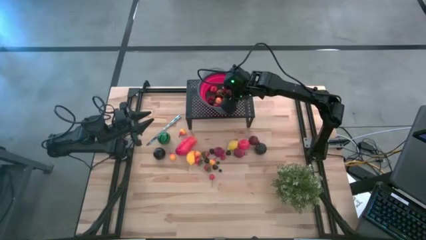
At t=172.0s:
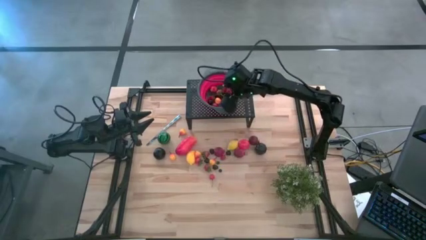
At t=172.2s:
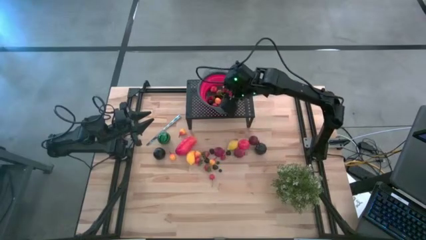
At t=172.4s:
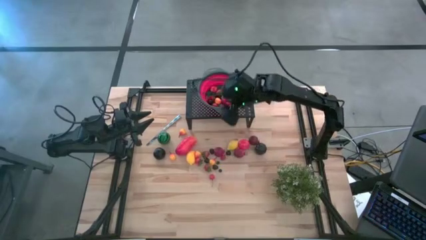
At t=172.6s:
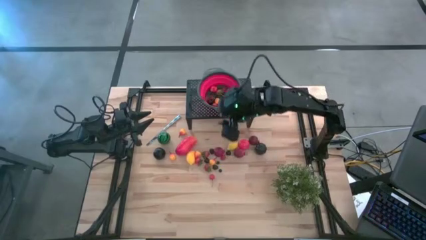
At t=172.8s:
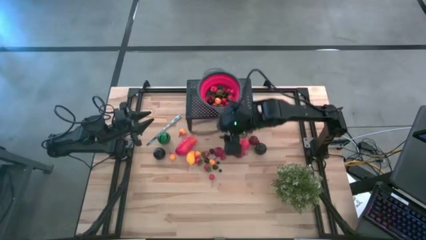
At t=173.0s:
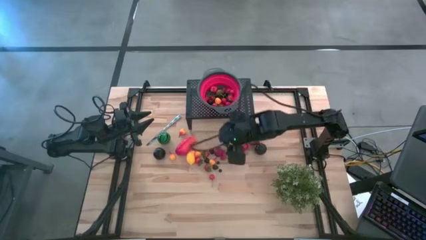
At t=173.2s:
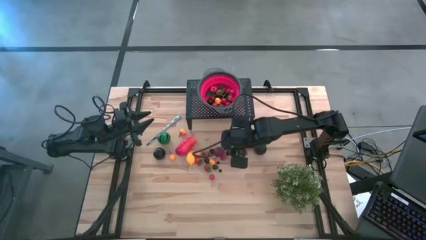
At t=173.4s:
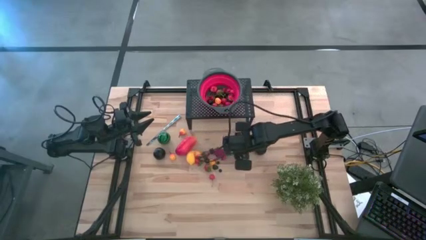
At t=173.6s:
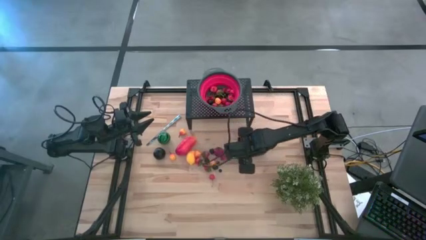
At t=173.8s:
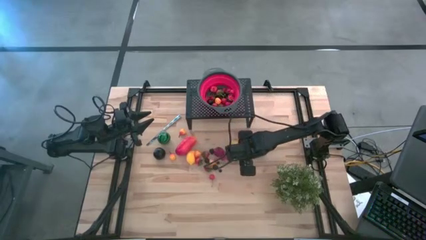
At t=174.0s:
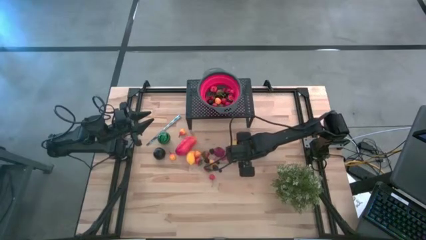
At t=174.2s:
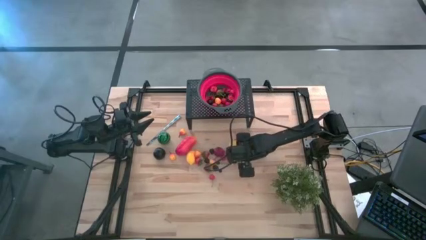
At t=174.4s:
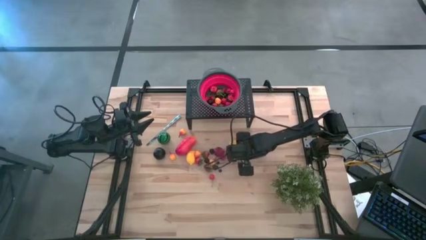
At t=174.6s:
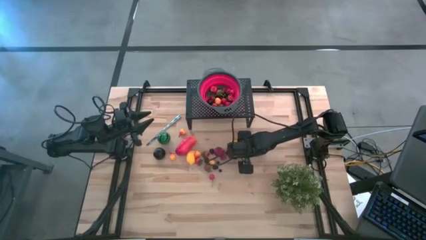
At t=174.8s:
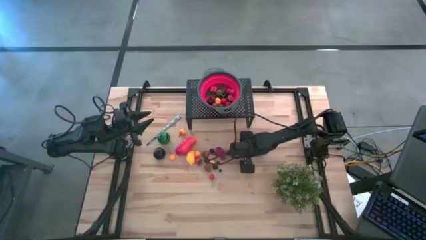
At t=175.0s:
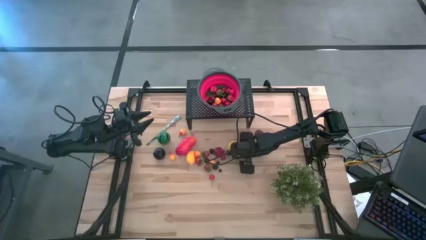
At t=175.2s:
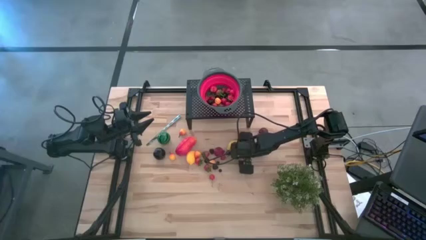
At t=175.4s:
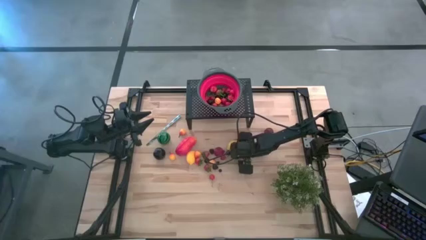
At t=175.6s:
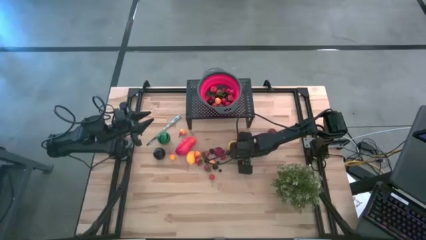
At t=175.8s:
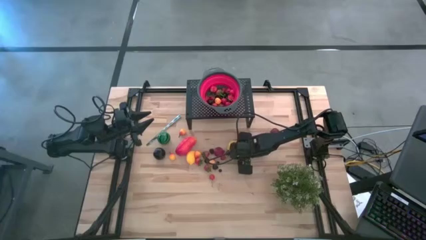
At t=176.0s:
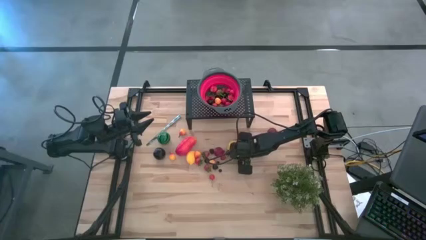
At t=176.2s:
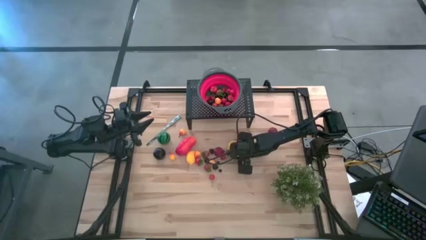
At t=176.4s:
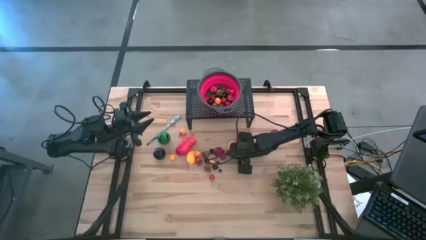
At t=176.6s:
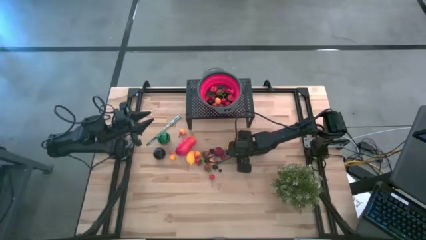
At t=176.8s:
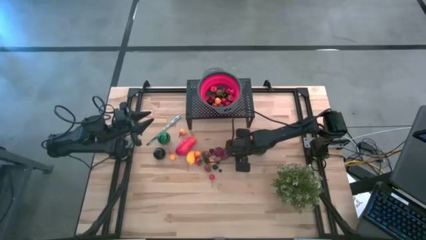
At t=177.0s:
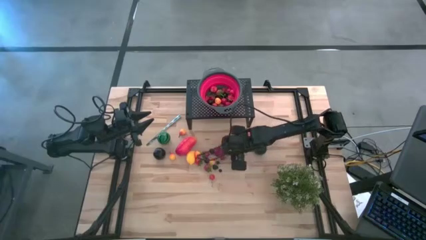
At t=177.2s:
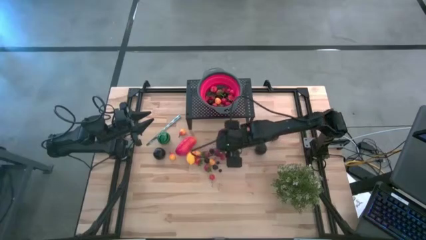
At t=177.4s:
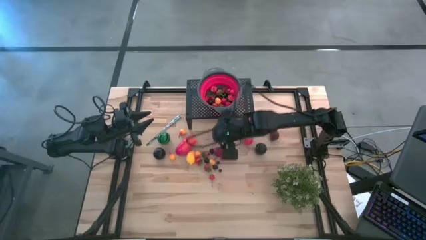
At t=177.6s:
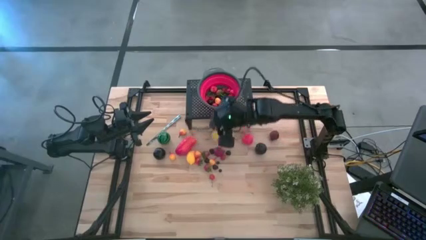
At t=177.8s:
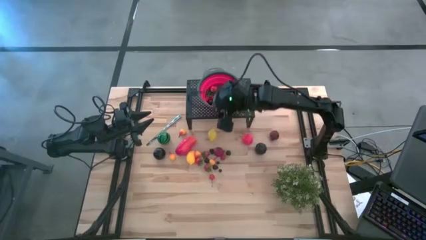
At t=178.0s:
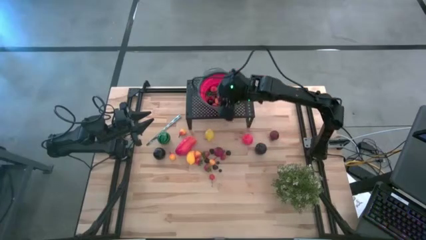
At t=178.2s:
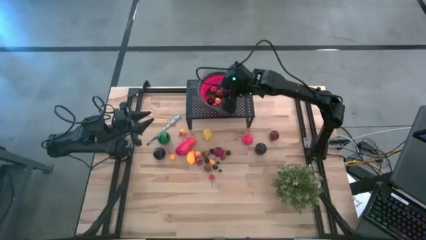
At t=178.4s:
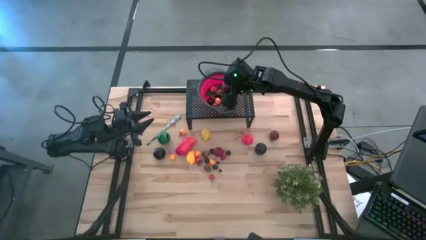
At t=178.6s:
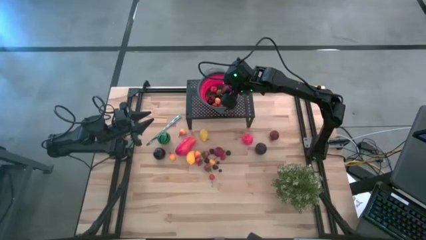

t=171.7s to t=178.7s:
Task: Pick & Place Fruit
Put the pomegranate in the red colander on the shelf

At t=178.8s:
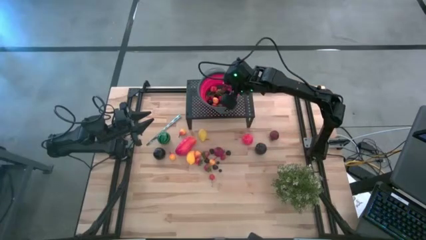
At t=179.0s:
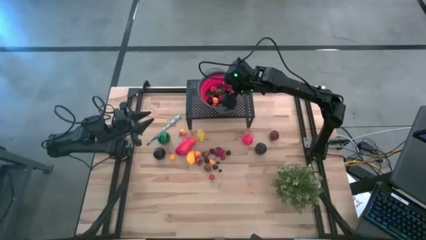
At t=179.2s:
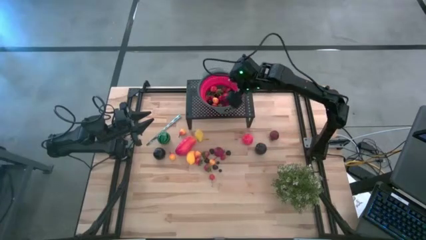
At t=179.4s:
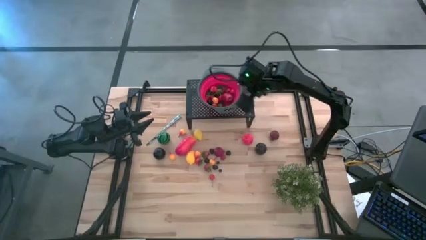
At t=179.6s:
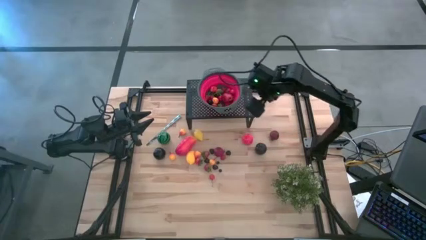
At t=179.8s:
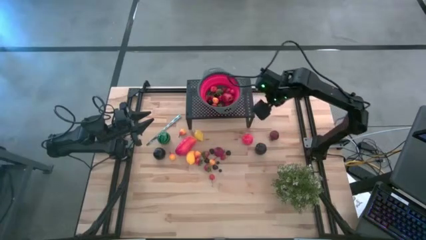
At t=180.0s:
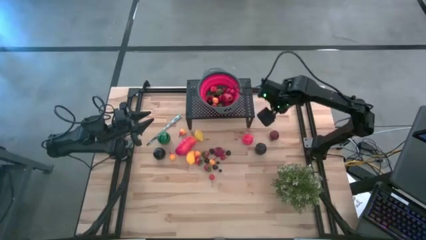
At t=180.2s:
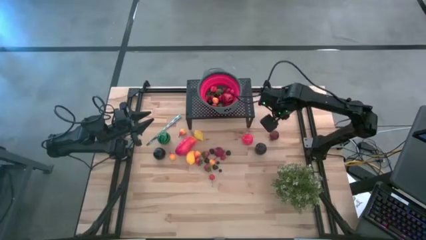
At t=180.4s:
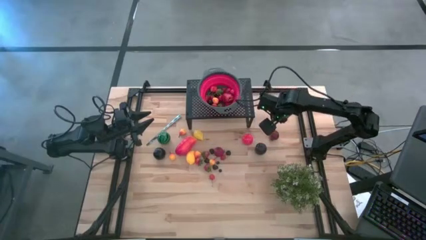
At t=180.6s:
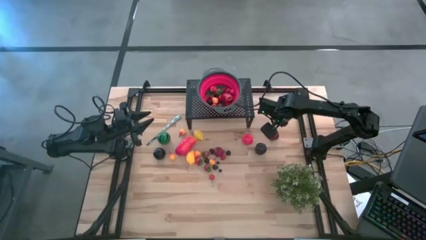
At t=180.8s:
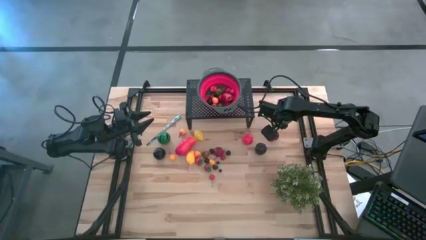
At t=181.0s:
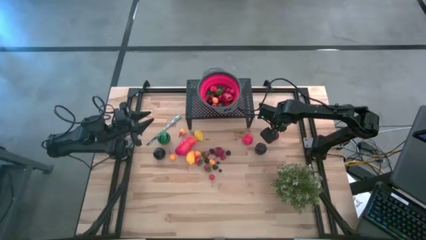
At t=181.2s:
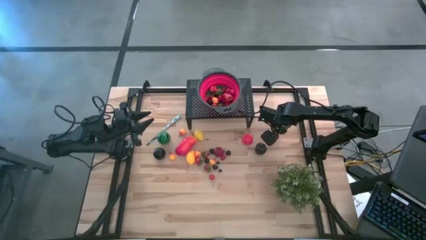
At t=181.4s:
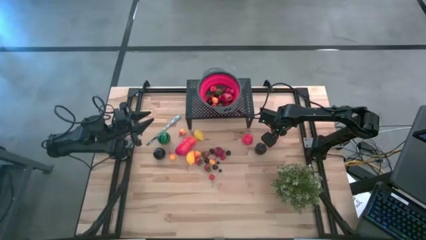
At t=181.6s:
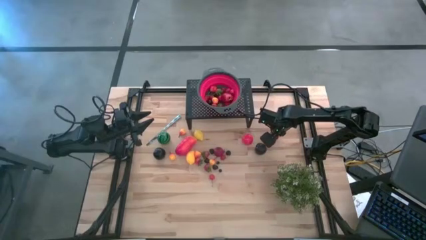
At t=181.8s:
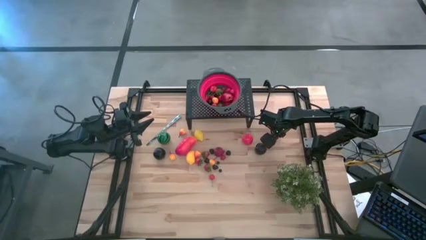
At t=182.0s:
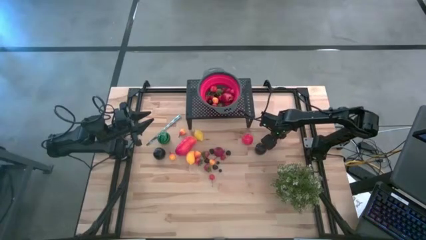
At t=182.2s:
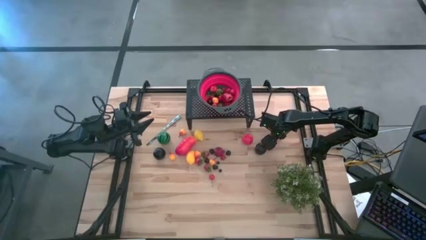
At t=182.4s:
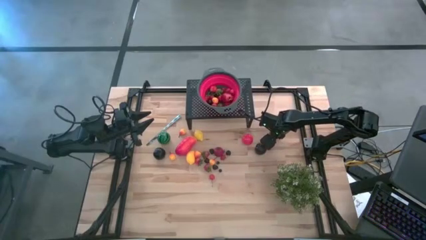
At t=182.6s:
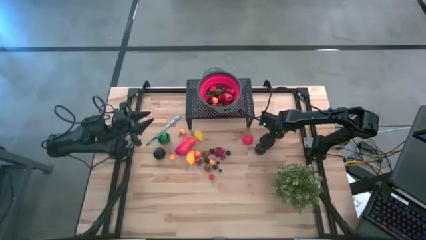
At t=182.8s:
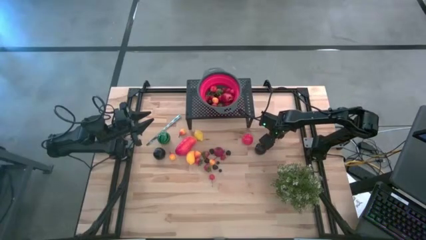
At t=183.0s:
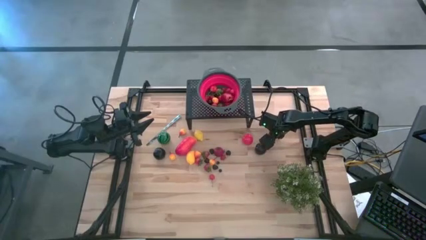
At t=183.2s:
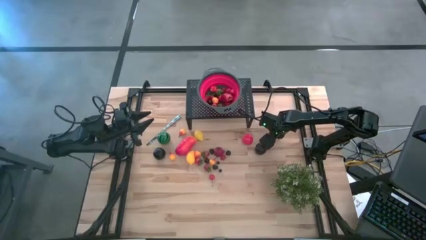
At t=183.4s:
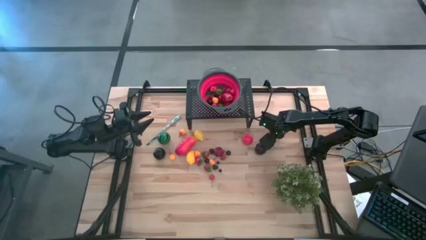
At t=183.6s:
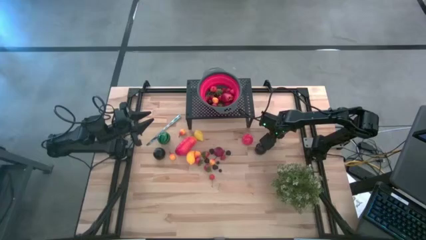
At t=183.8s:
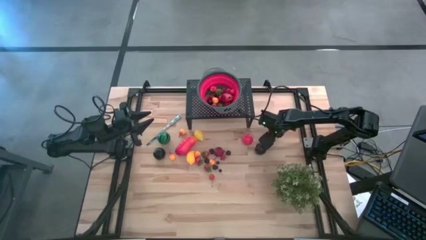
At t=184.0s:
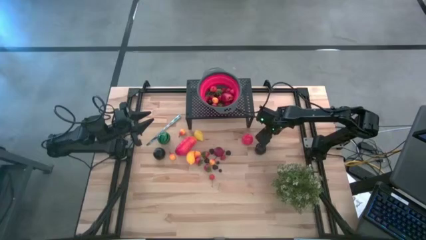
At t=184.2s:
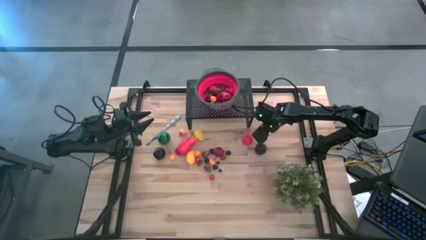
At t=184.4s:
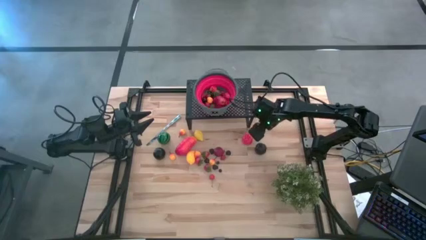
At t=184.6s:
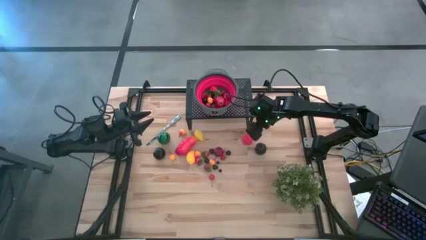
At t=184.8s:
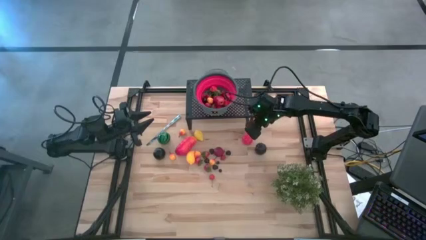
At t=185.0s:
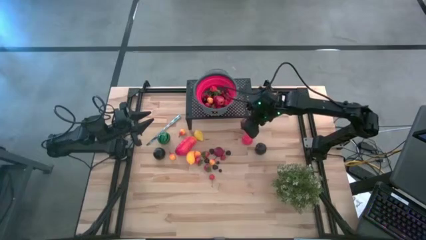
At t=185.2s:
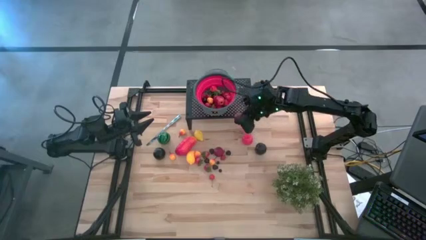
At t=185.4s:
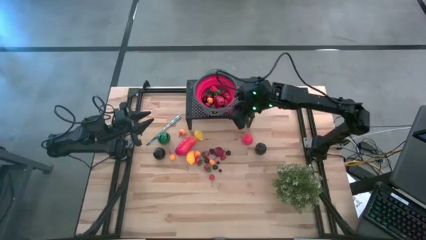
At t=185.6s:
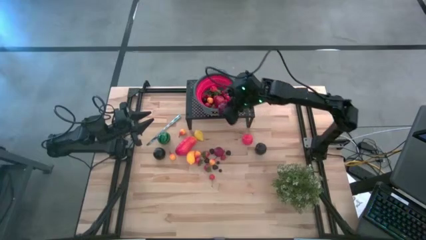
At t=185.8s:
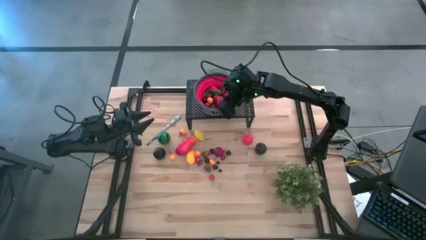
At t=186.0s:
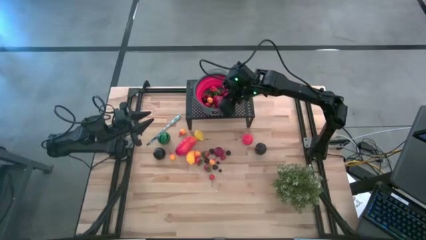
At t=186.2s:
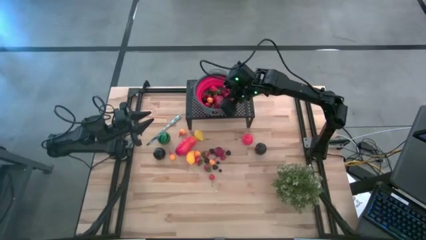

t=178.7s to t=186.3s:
Put the pomegranate in the red colander on the shelf

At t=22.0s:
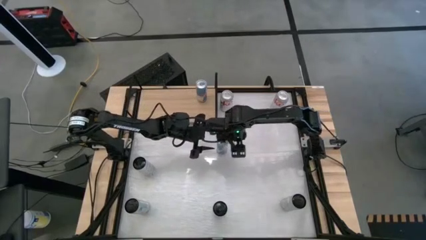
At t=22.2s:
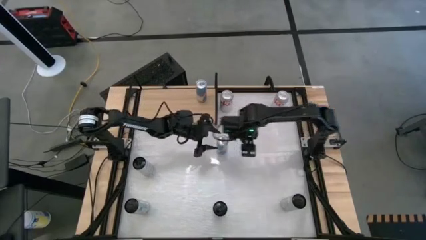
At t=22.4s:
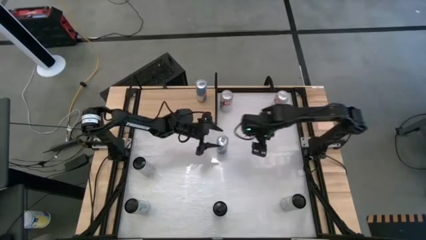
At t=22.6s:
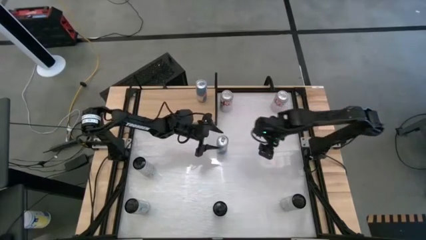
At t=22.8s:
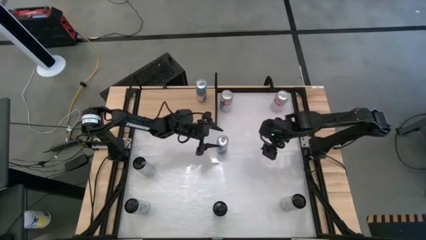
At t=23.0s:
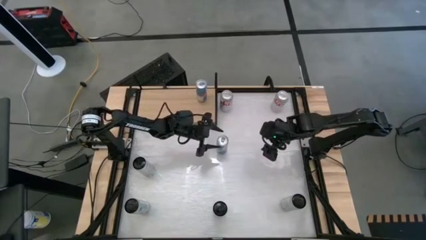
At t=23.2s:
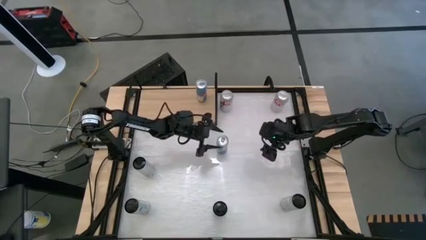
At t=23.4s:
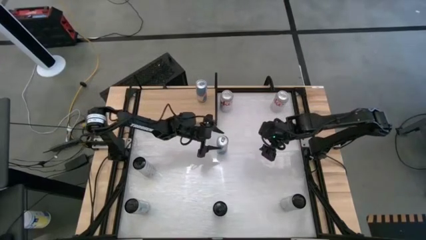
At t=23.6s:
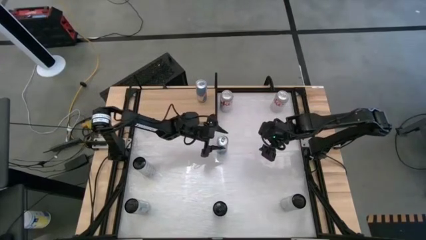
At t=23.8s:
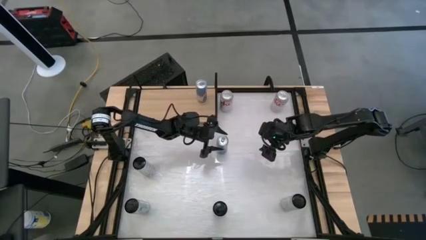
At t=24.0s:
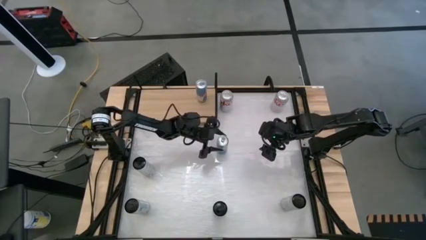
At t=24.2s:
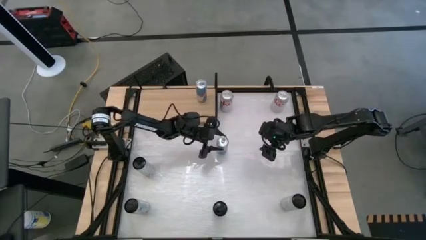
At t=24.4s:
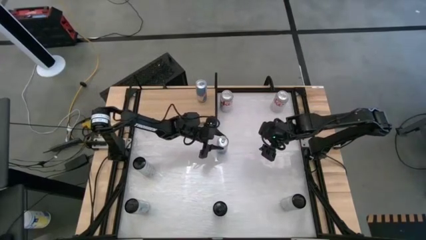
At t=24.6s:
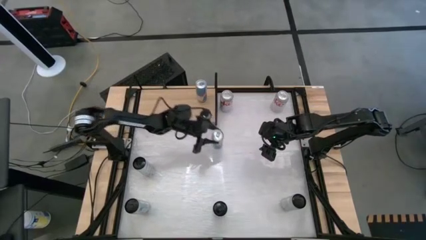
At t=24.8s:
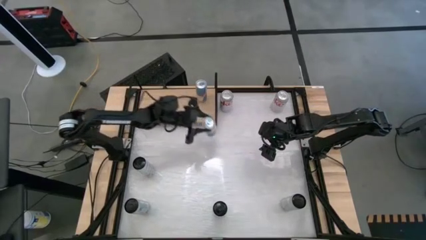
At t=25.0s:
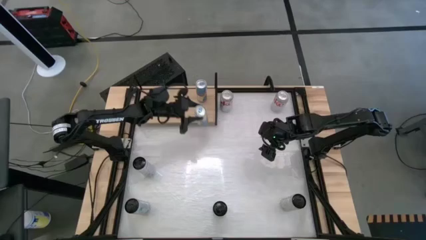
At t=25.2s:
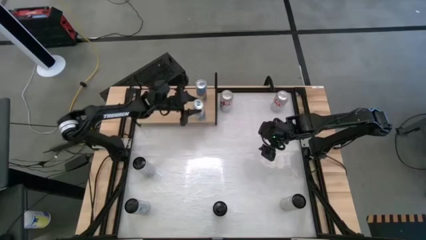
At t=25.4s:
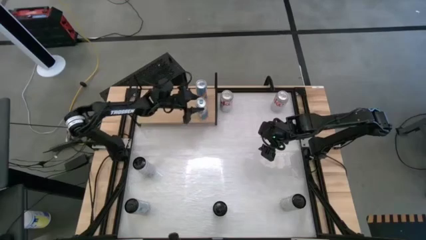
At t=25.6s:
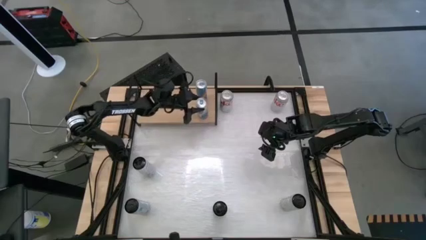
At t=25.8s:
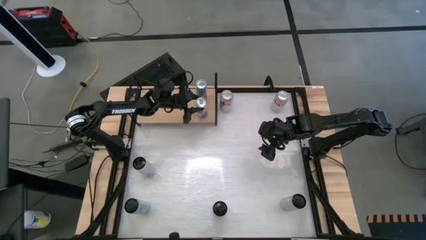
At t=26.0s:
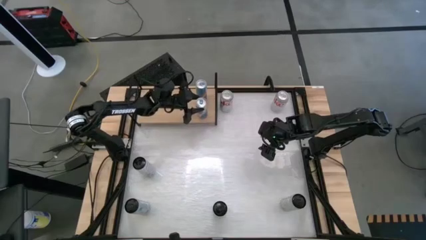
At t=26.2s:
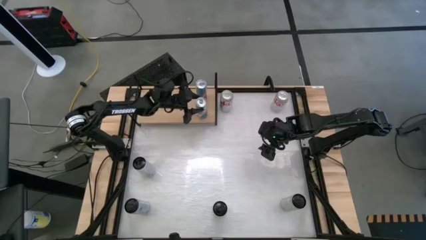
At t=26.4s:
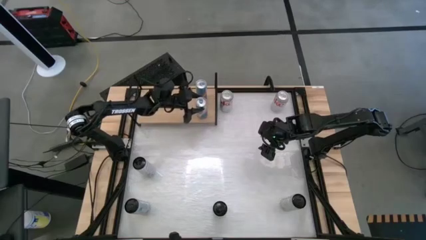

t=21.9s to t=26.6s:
Task: Place canned beverage on shelf
Put the blue soda can on the shelf
